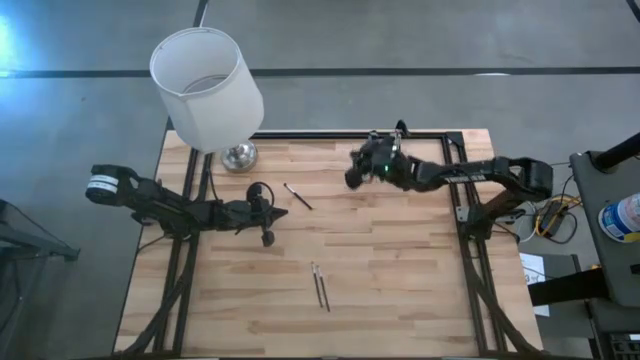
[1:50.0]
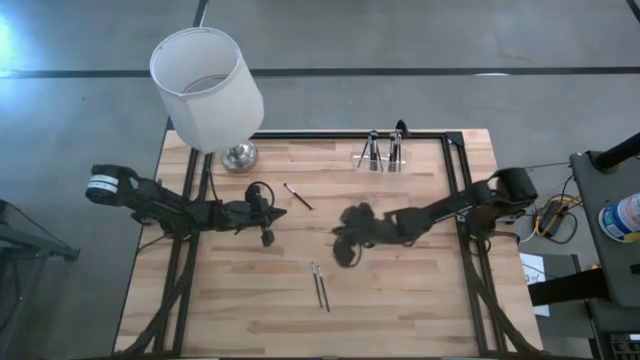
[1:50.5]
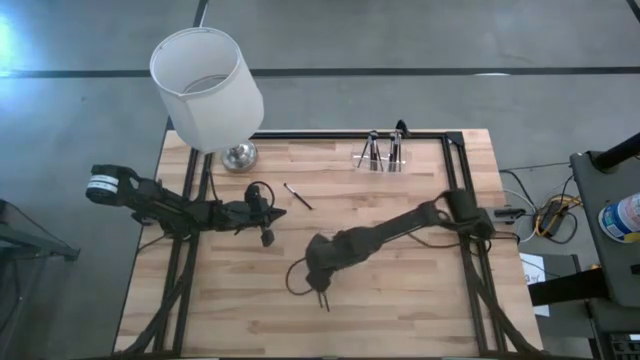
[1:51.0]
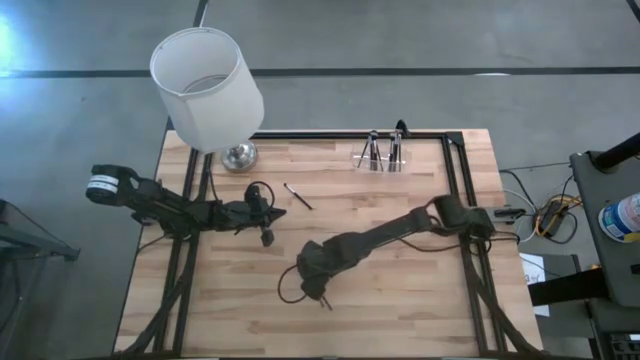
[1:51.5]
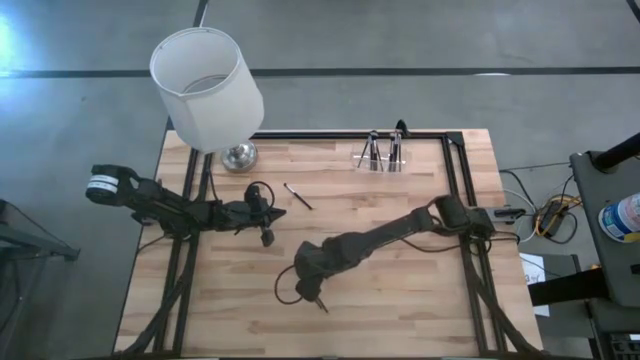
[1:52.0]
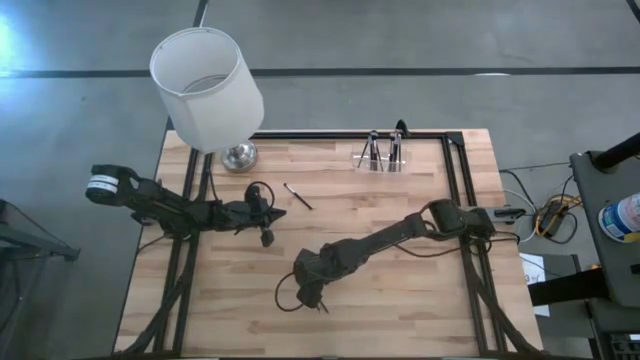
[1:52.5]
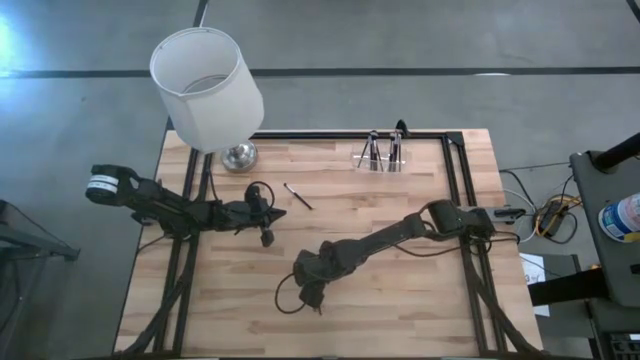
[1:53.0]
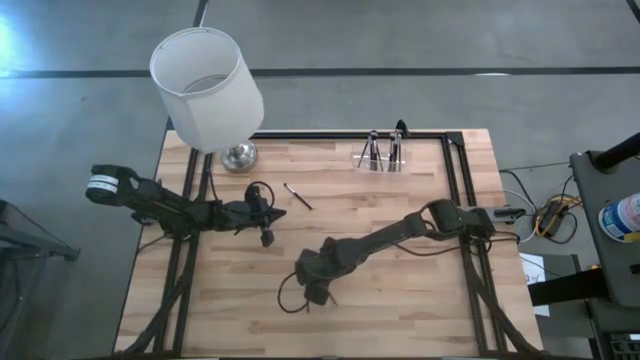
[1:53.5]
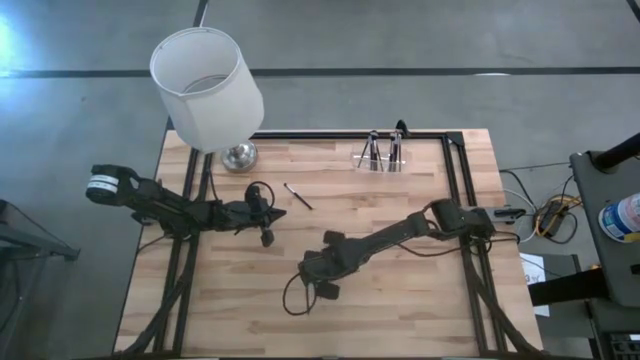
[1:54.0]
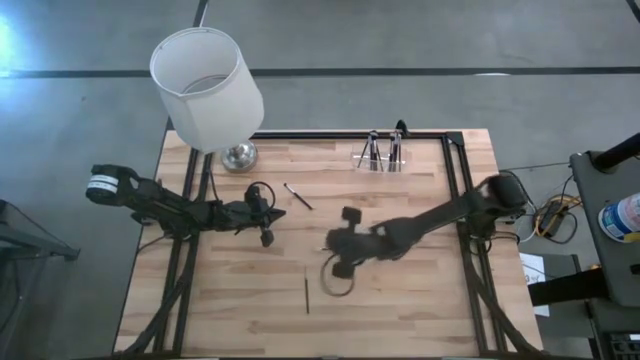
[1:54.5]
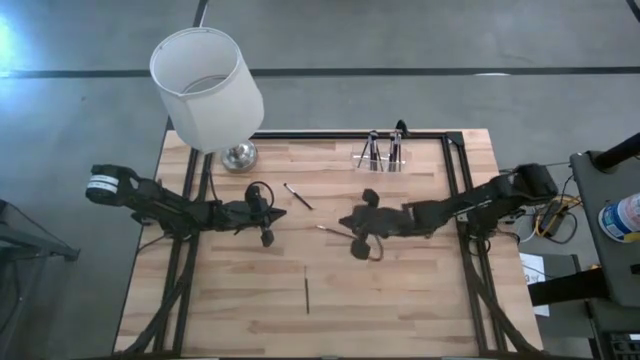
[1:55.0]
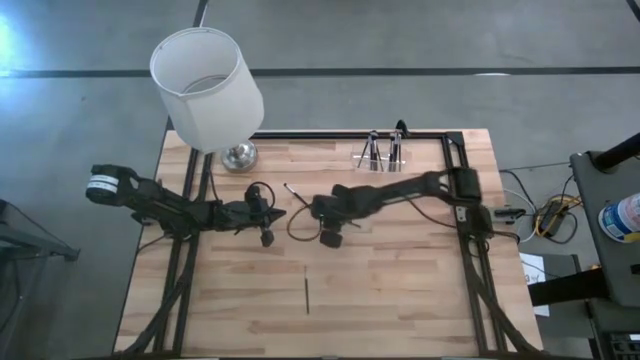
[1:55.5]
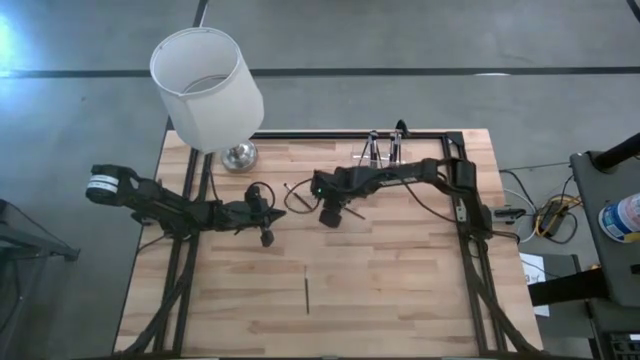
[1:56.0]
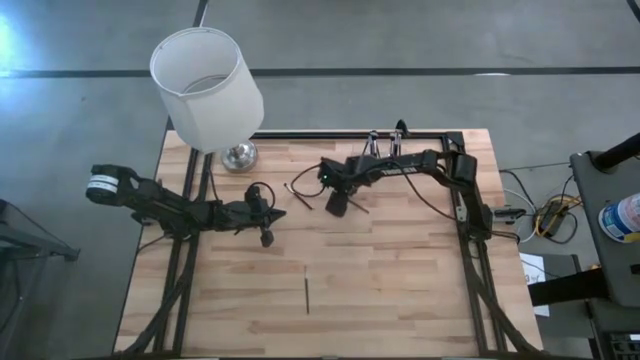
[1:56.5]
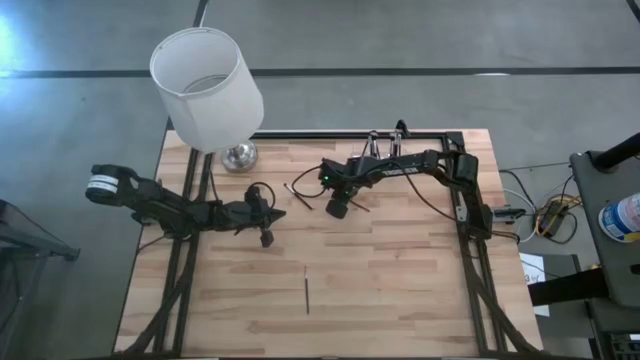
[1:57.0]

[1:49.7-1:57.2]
Task: Put items in baskets/containers
Put the foundation brush into the transparent organizer

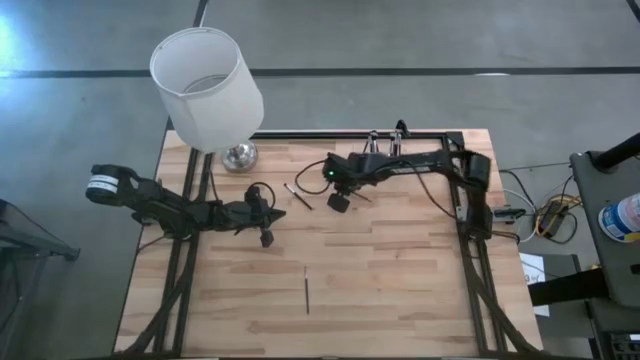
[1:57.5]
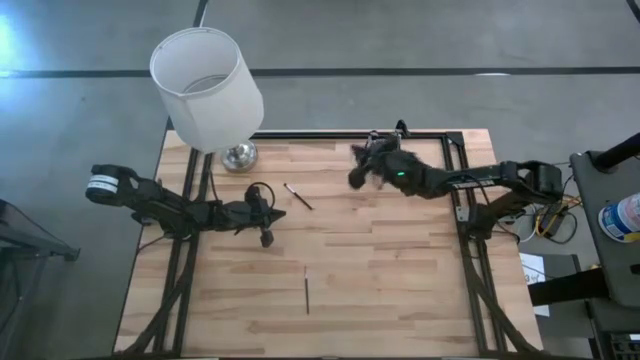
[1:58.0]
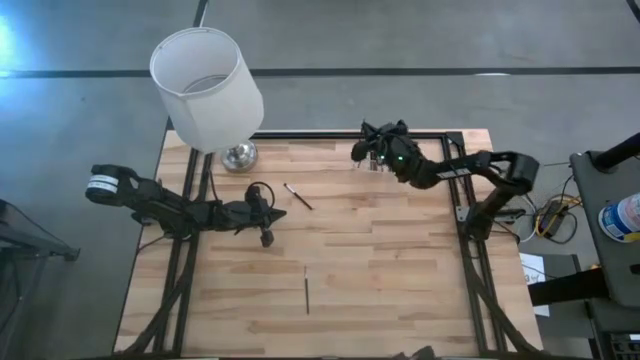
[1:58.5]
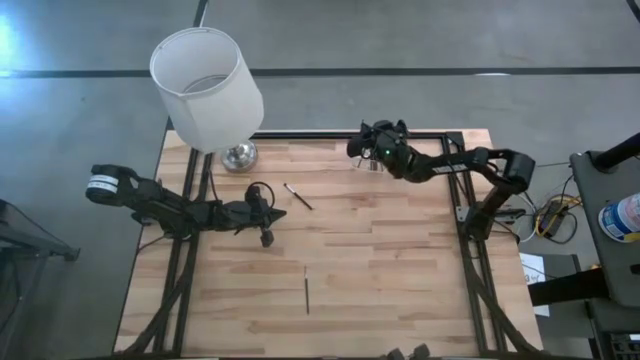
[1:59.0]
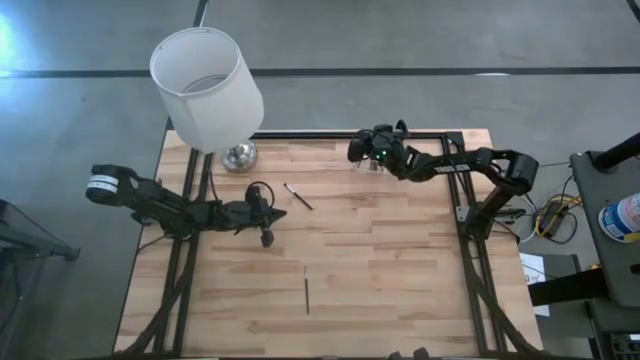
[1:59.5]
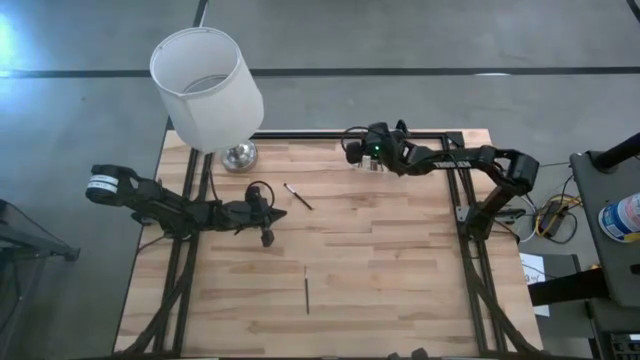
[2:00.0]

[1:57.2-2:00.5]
Put the foundation brush into the transparent organizer

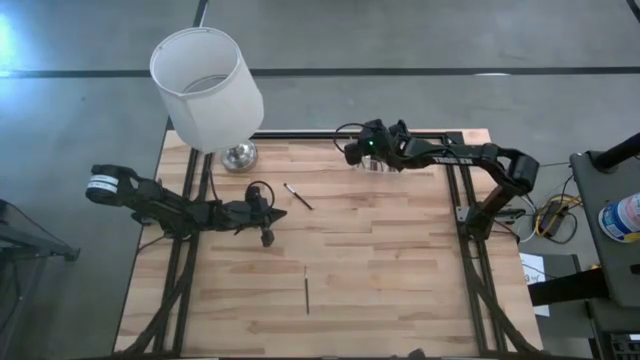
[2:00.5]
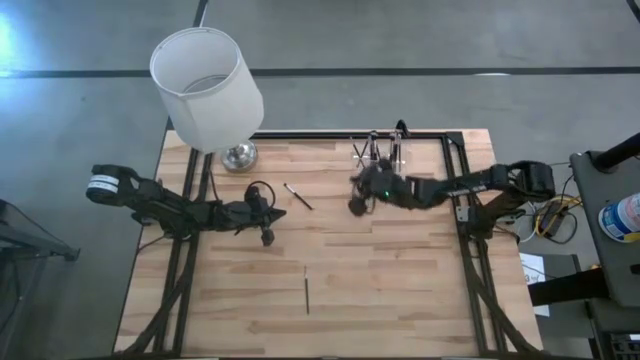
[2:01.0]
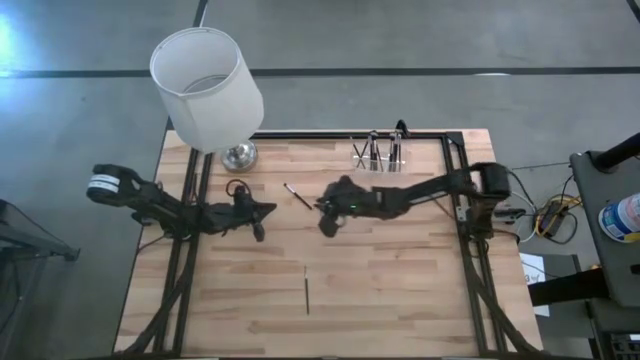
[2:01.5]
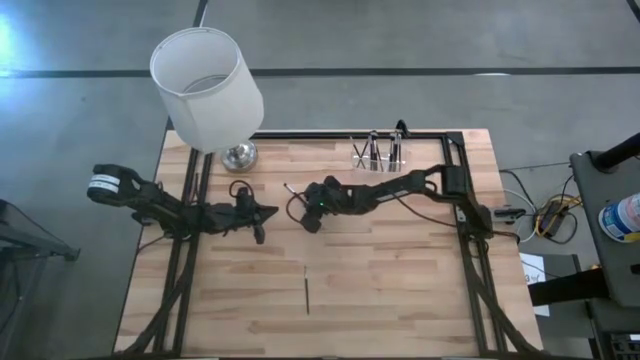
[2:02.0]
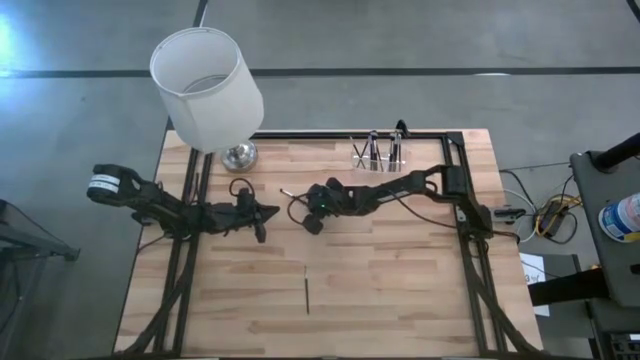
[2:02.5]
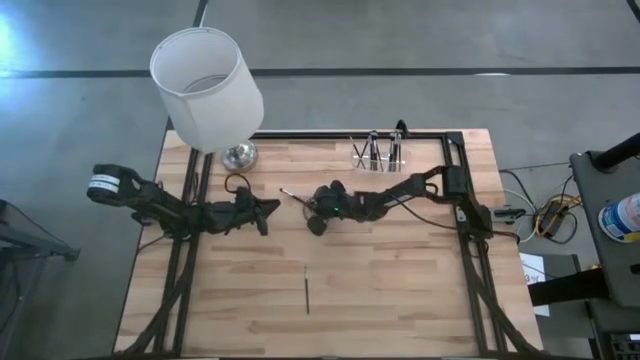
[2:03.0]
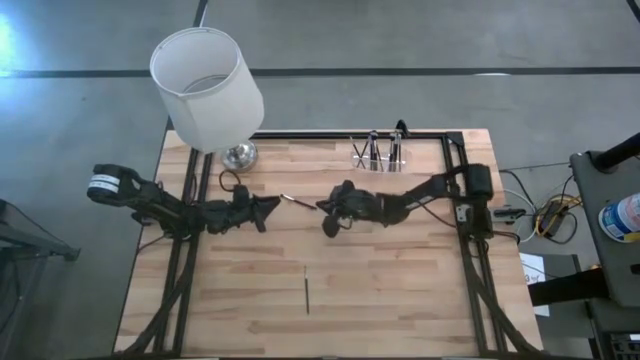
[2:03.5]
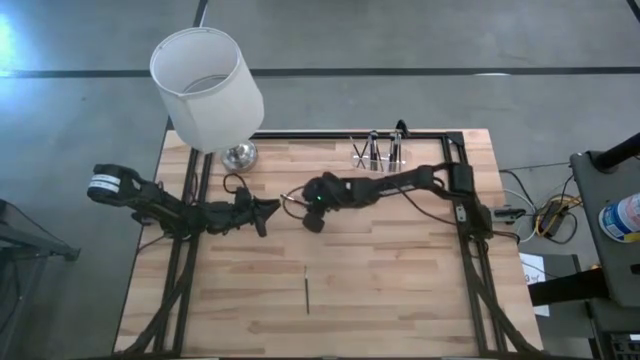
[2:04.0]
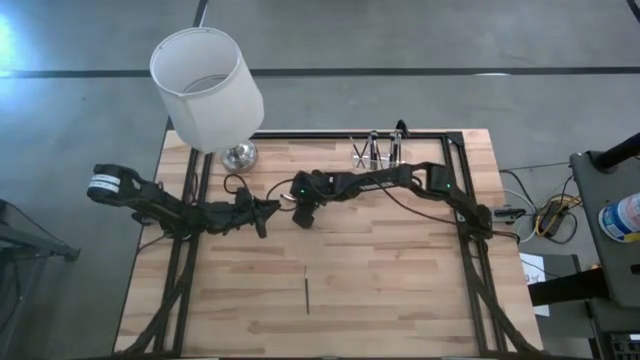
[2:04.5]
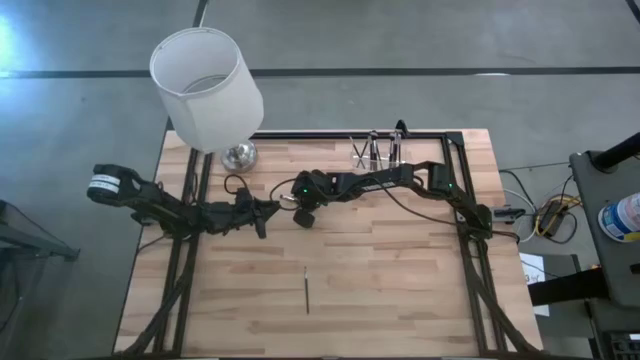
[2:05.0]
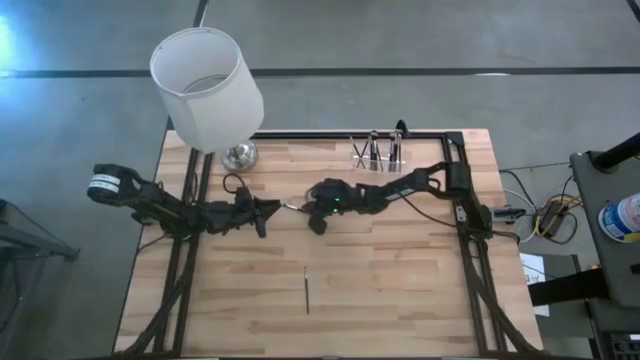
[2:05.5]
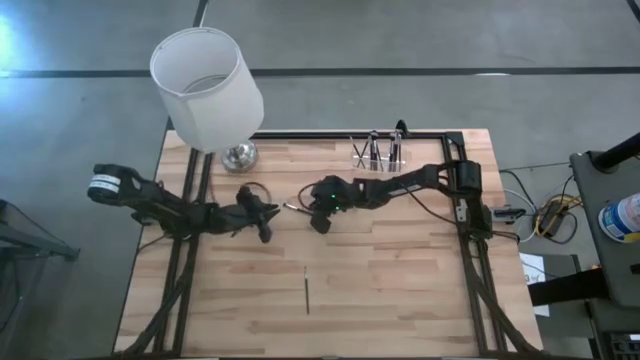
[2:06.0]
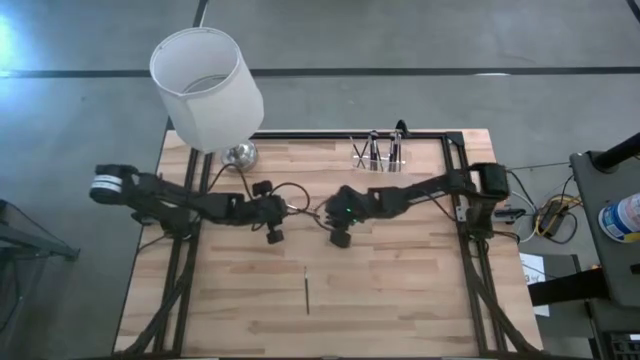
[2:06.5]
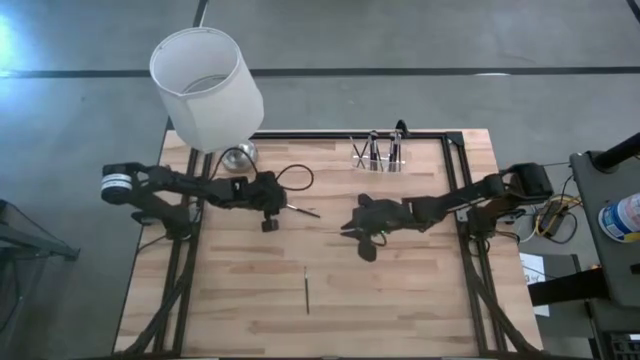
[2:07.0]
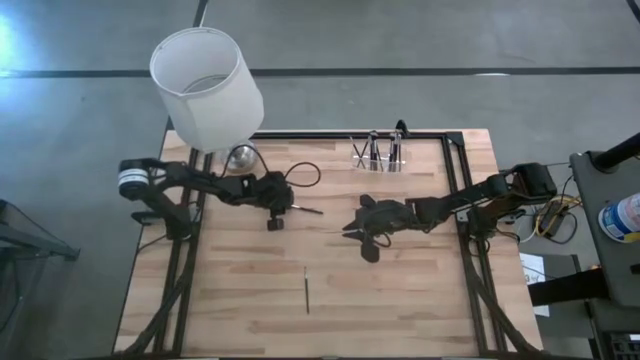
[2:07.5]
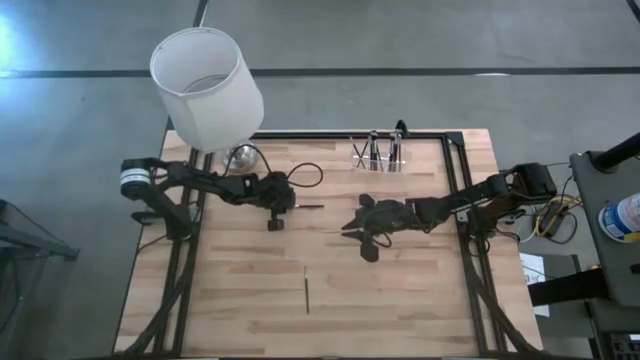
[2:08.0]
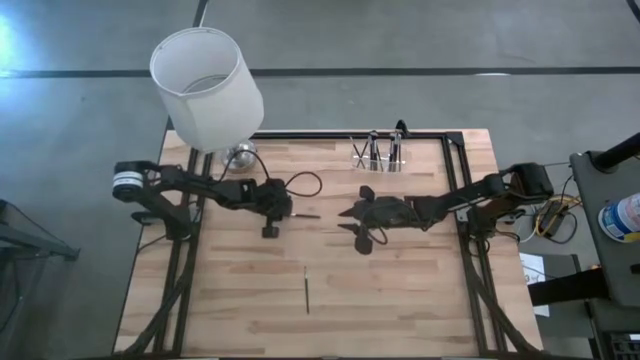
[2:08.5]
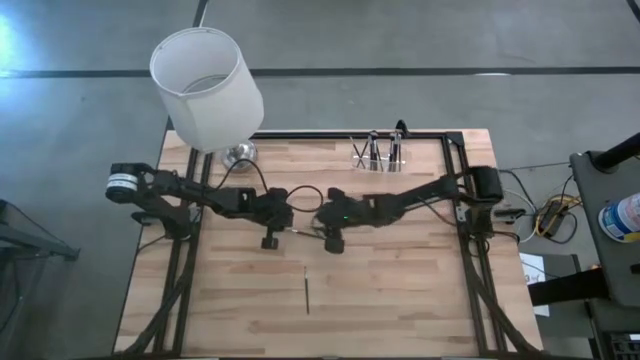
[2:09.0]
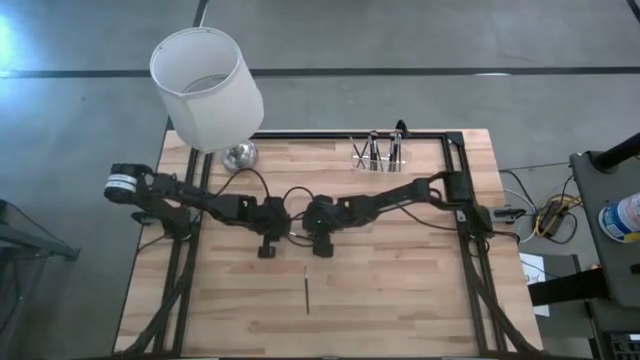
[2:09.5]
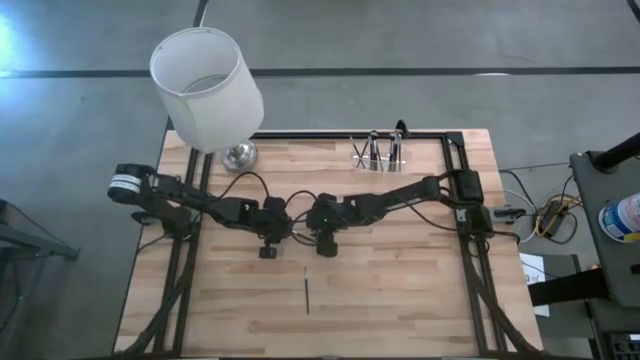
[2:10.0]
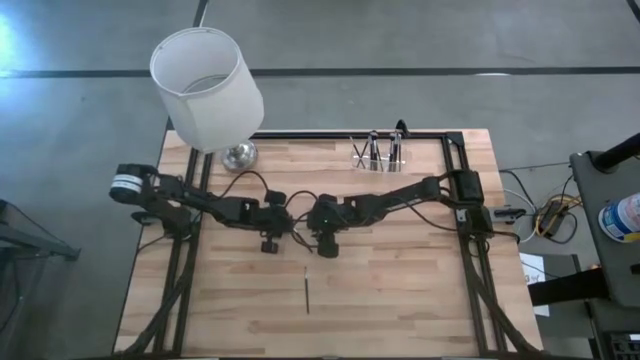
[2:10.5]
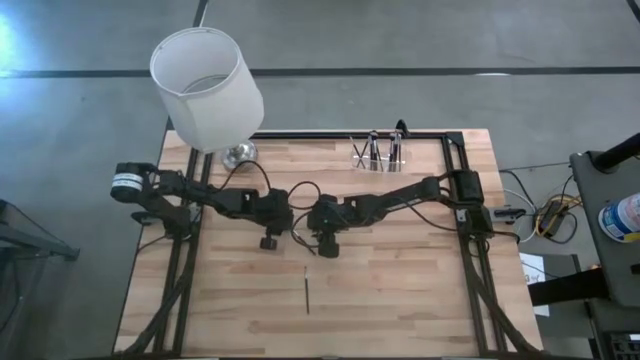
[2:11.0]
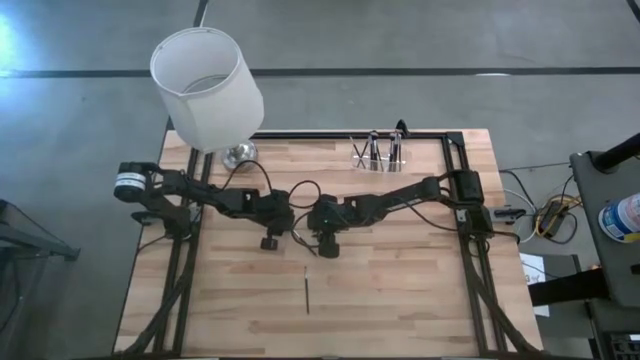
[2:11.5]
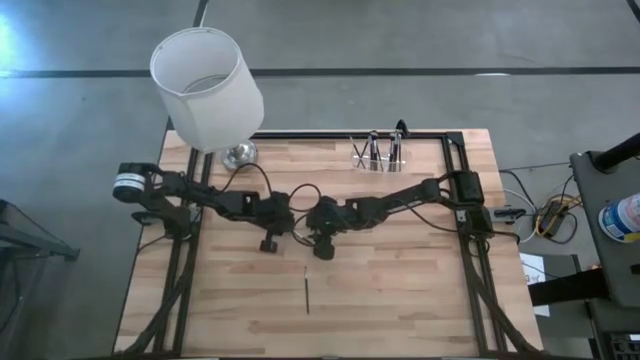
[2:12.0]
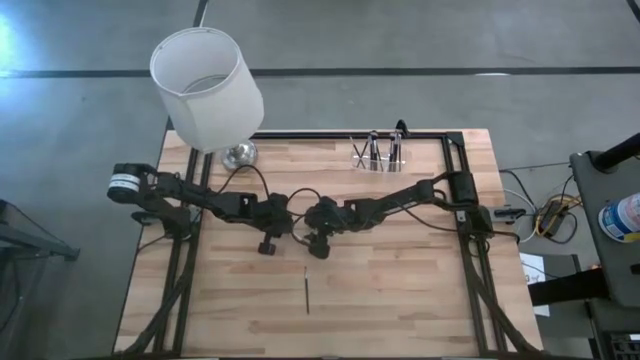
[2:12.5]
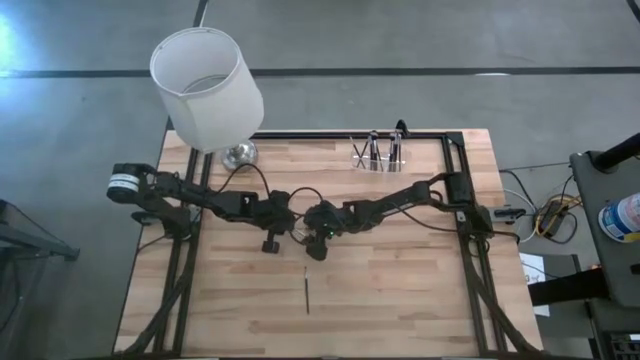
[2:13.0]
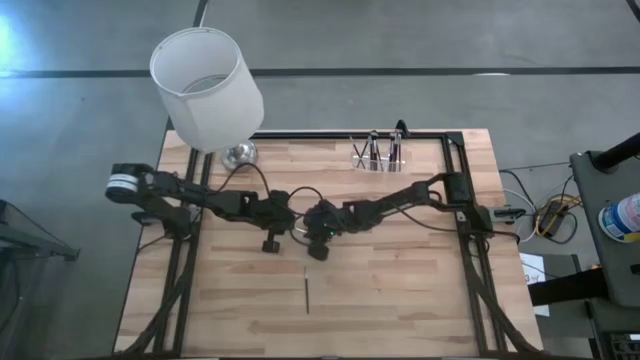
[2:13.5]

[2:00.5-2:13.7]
Put the eyeshadow brush into the transparent organizer
